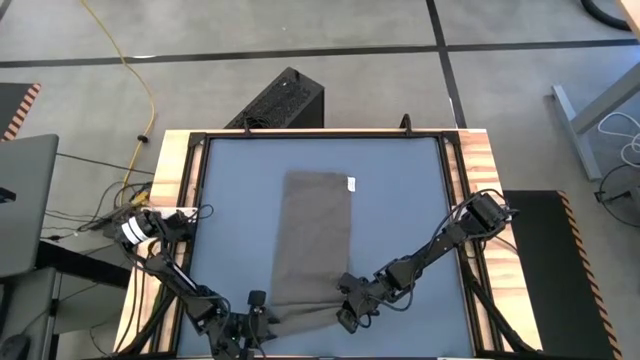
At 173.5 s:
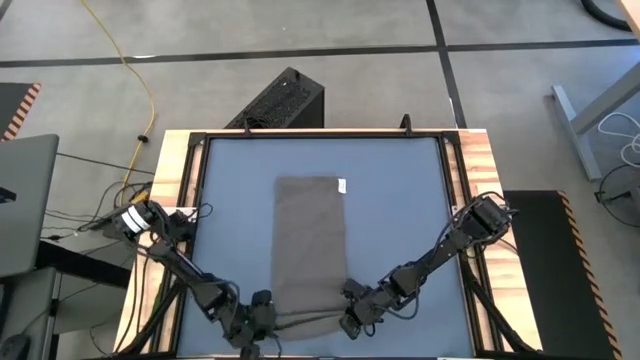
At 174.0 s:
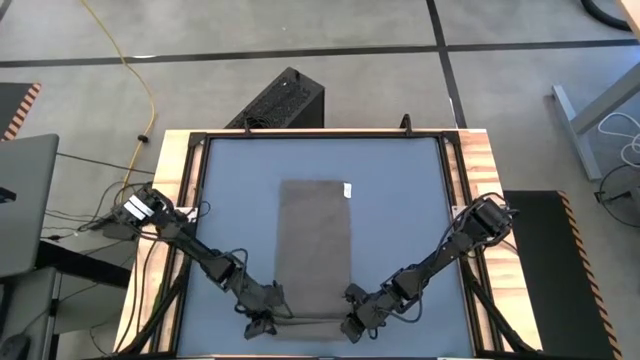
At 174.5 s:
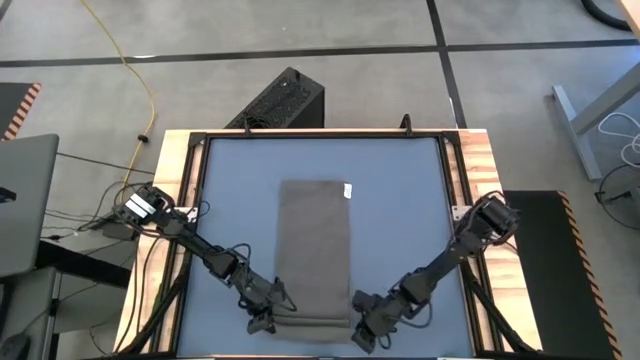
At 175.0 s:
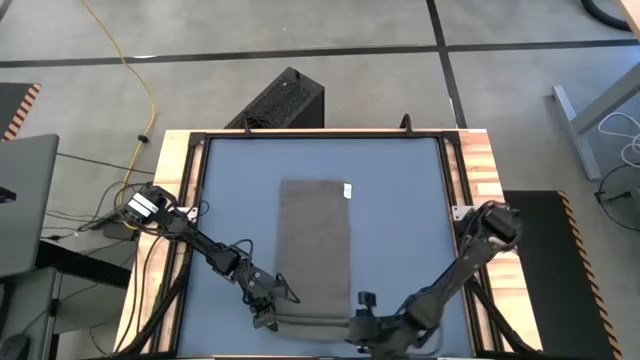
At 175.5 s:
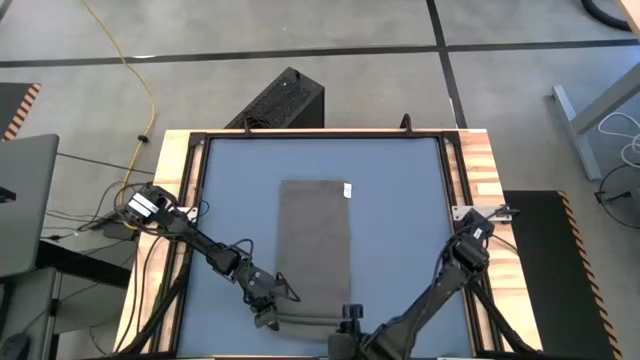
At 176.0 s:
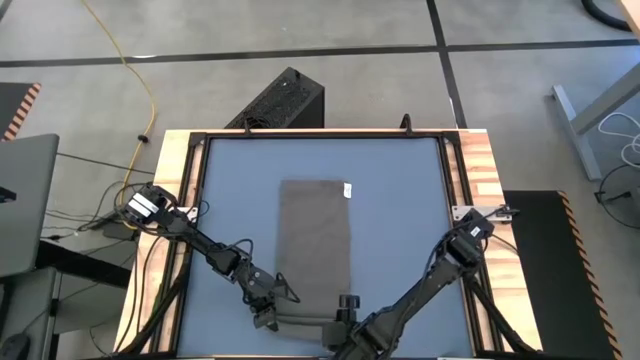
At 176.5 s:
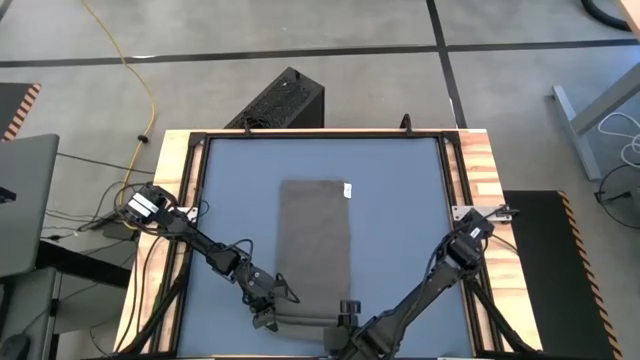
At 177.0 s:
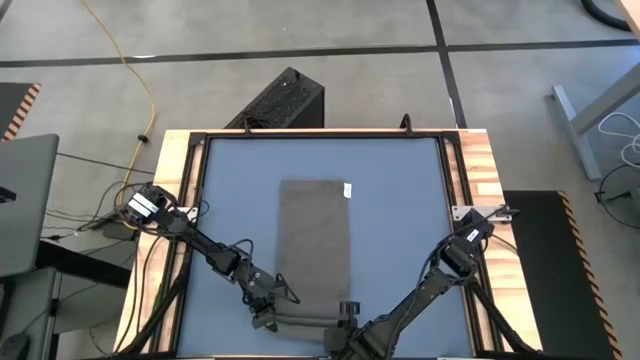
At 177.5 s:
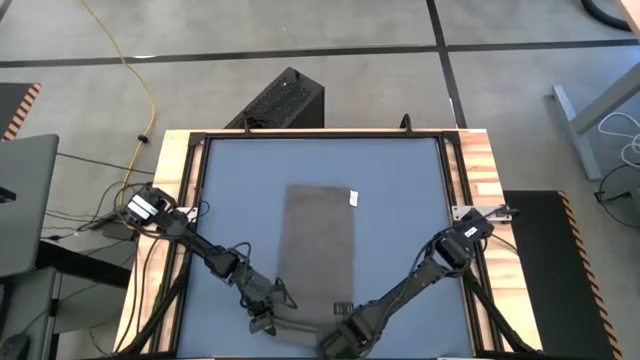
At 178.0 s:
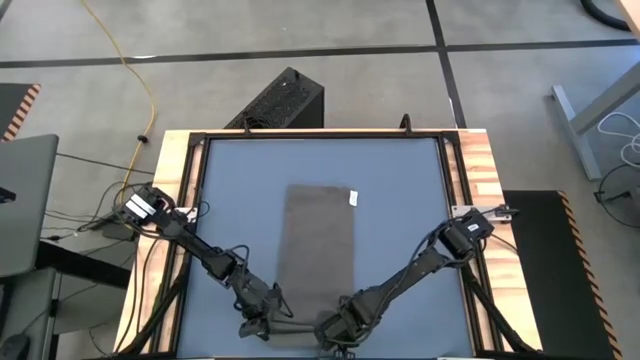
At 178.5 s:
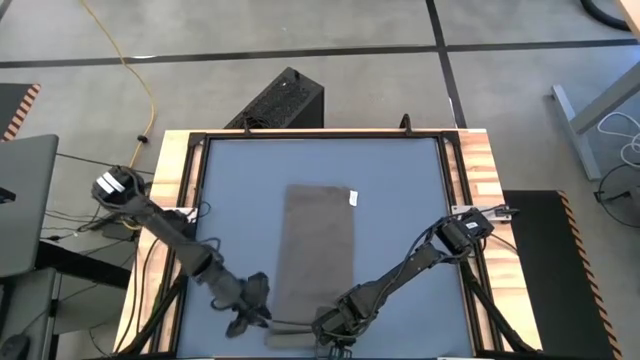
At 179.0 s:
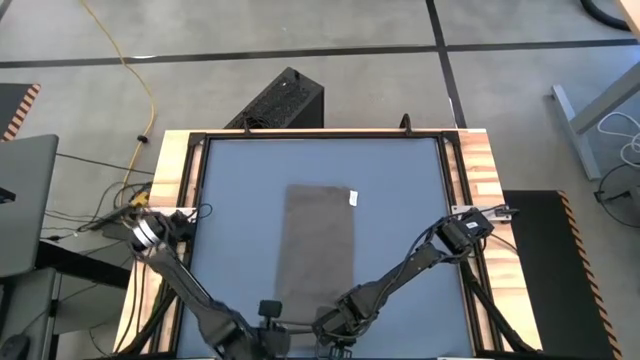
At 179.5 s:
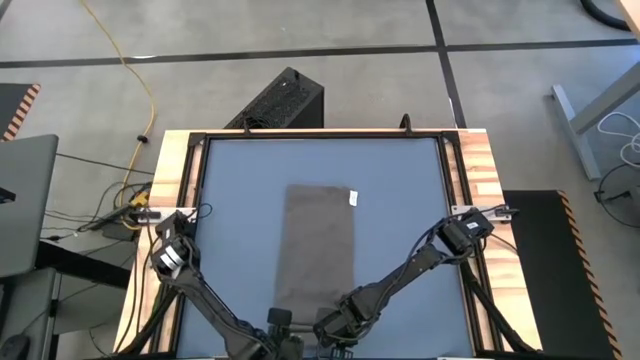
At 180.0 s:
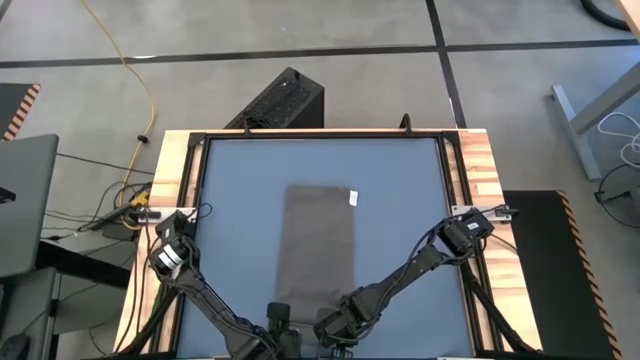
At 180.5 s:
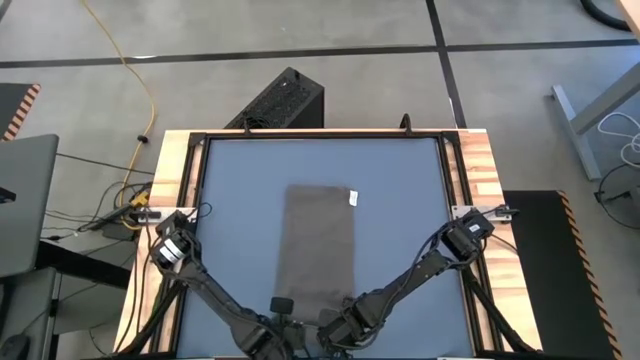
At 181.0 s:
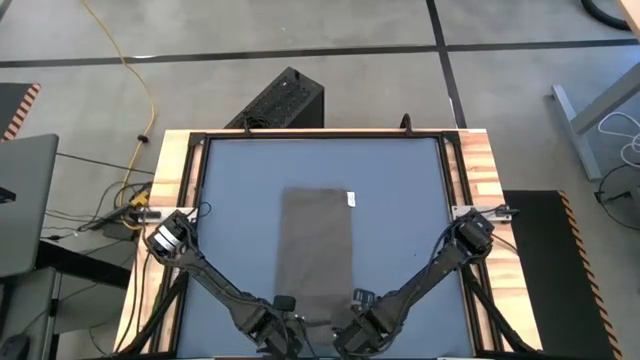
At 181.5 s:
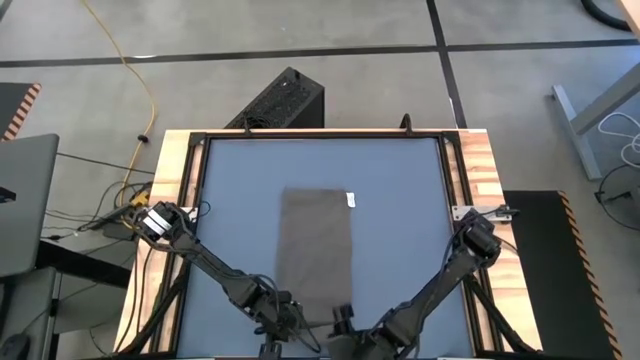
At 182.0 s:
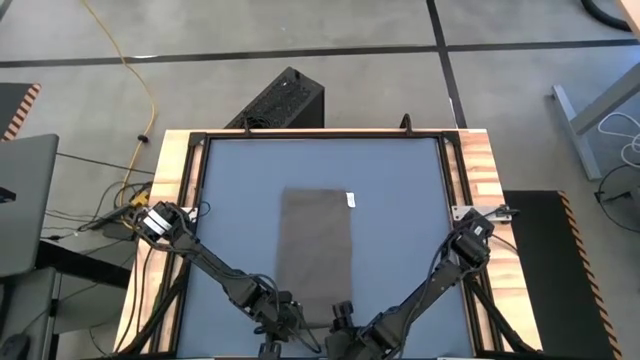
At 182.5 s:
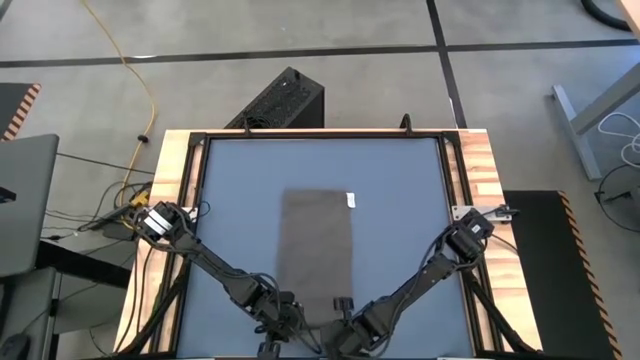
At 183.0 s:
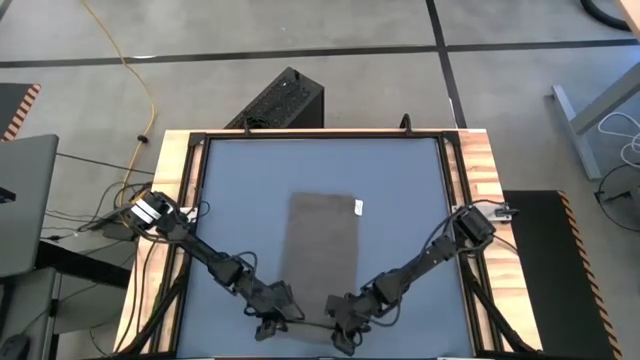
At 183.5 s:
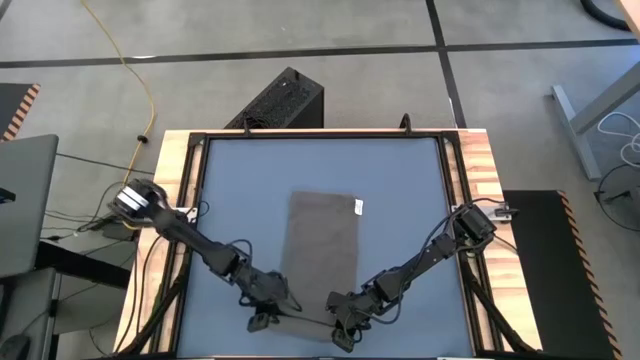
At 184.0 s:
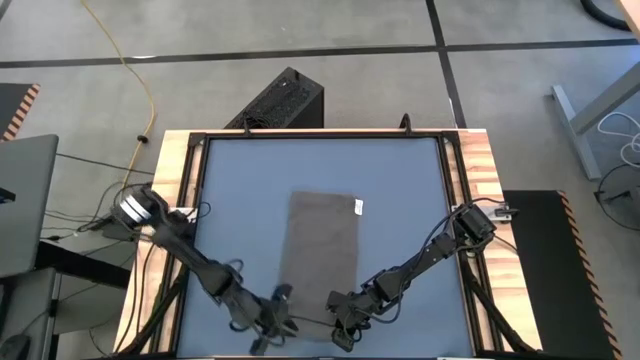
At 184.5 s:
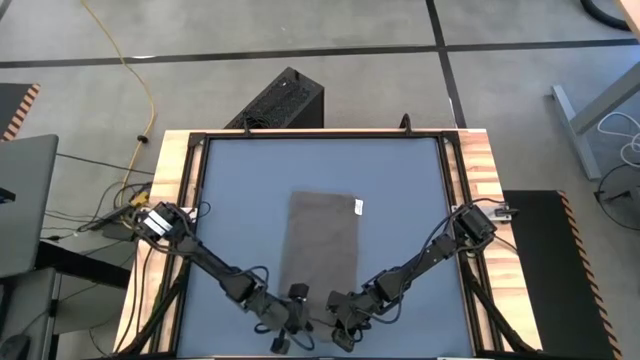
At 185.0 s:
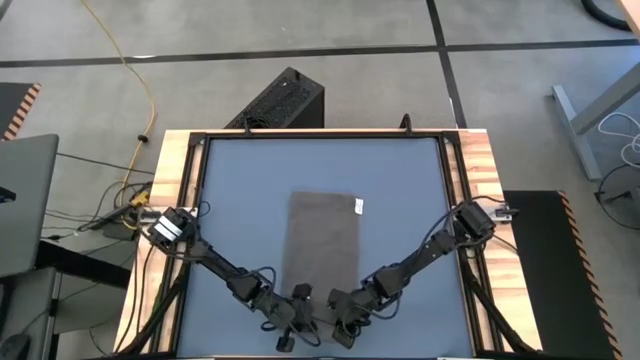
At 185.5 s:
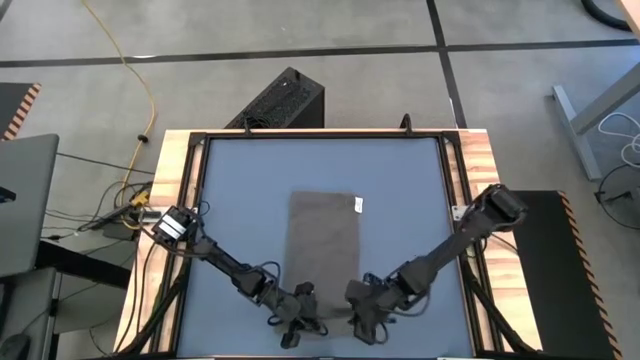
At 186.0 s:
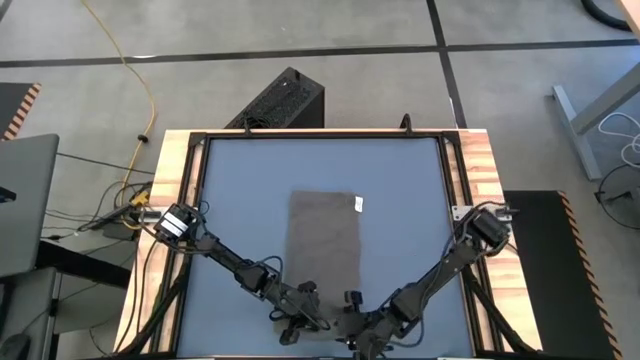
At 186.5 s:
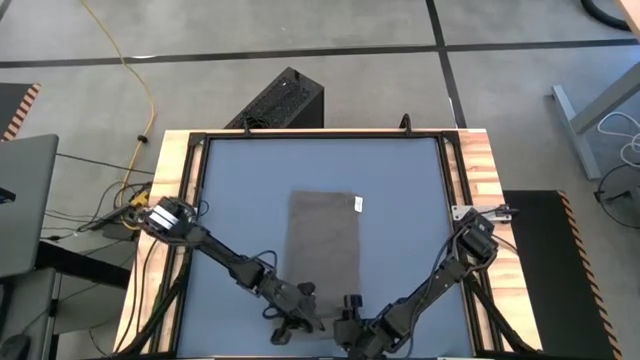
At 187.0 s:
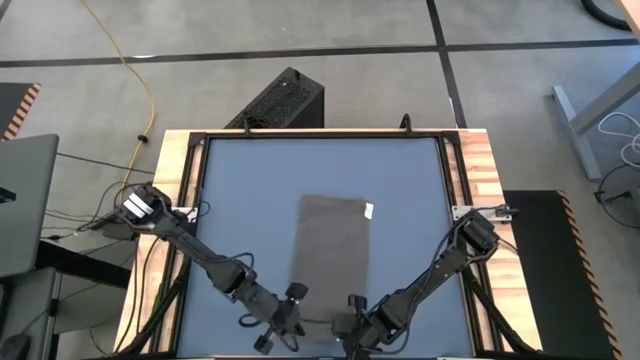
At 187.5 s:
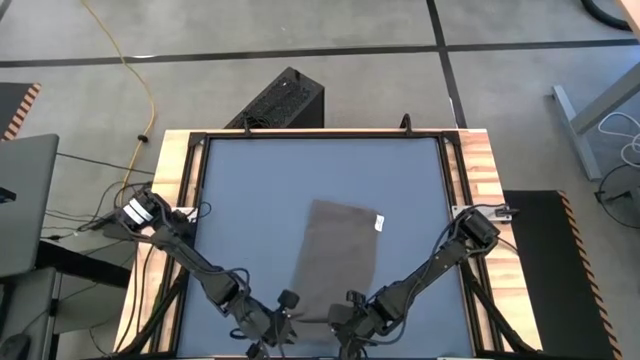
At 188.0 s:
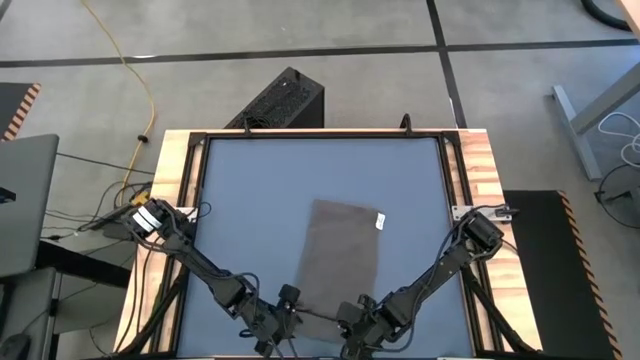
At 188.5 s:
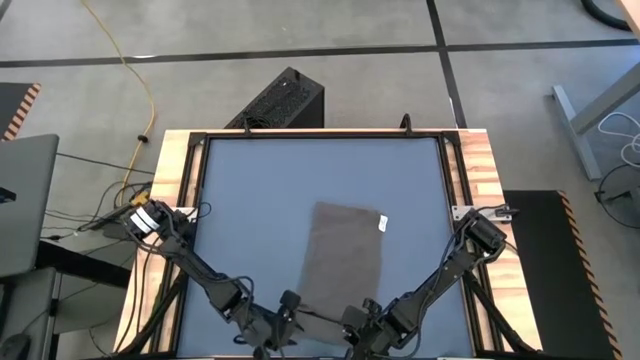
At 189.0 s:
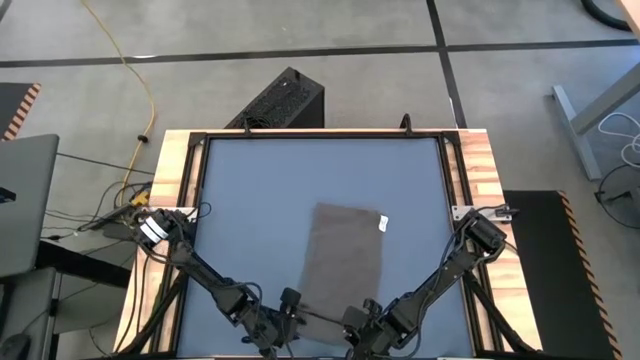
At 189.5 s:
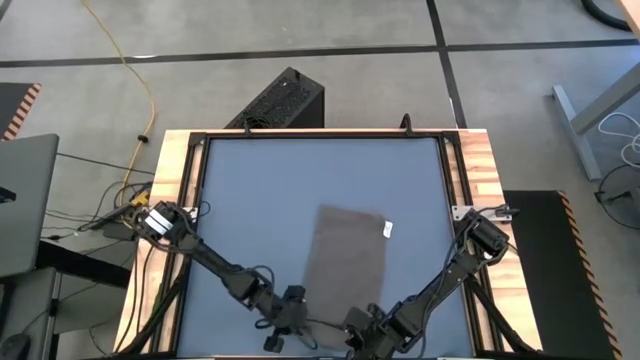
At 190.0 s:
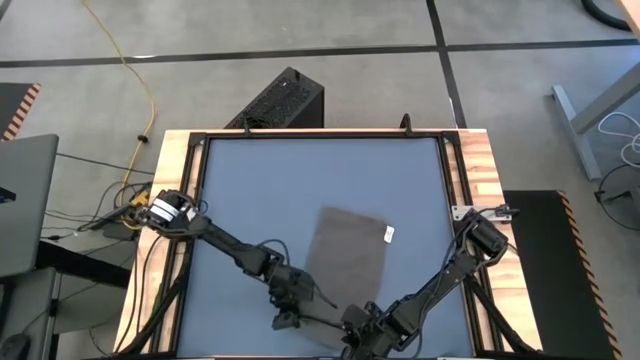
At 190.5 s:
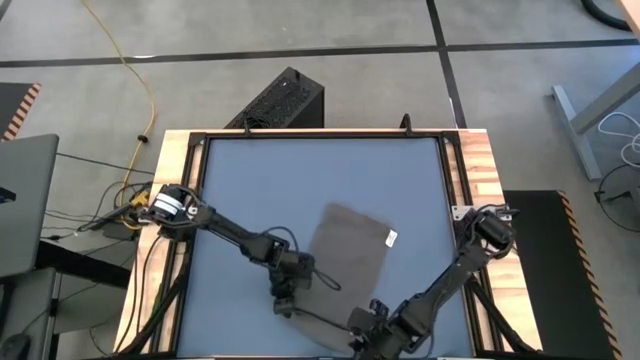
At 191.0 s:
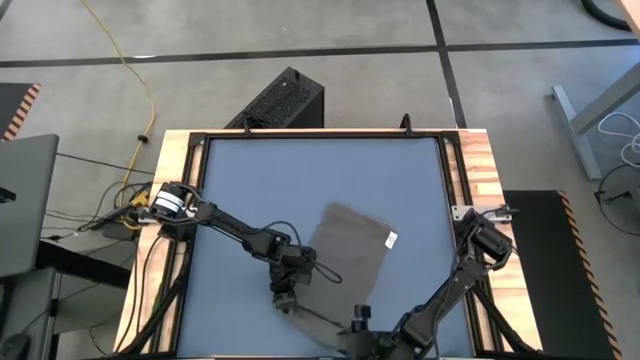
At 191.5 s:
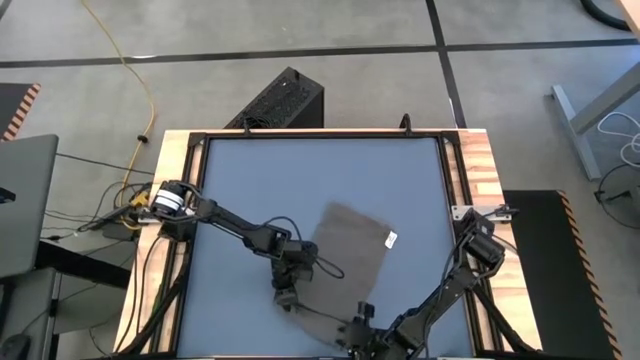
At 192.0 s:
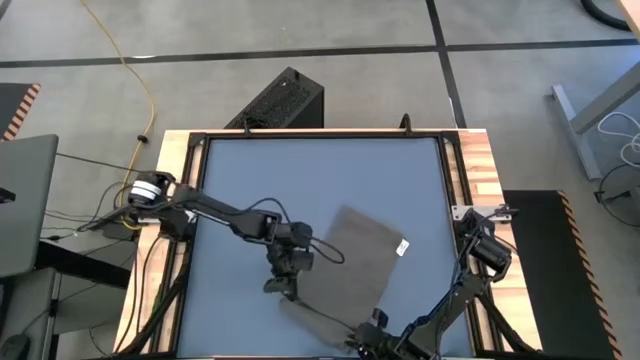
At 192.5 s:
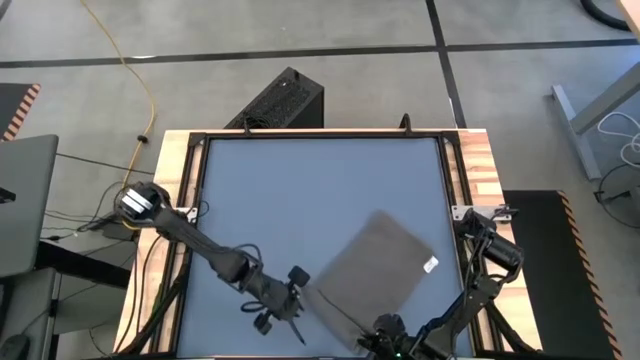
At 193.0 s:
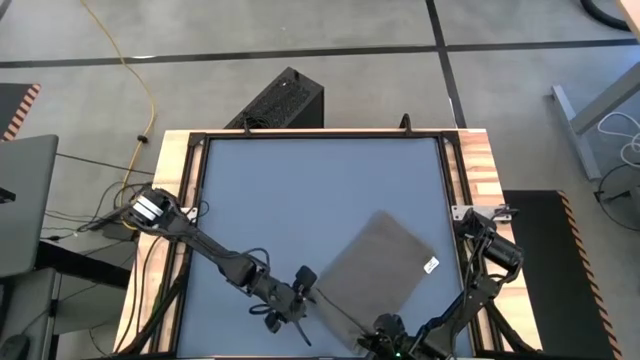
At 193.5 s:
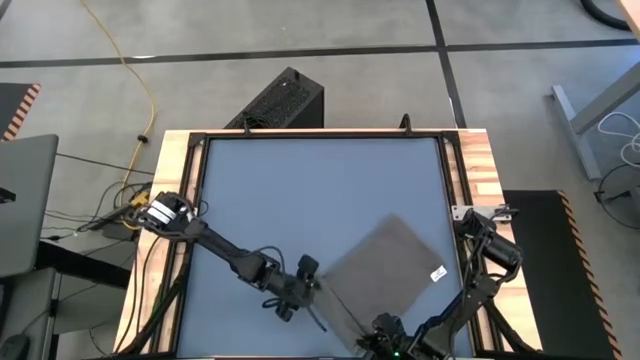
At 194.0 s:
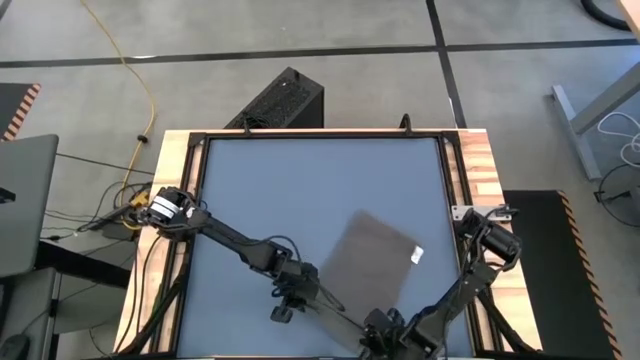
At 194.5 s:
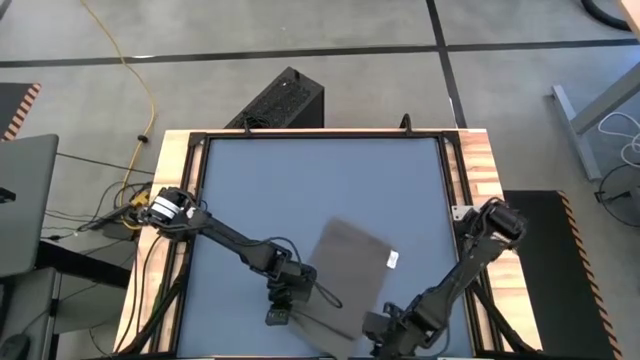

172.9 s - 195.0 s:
Task: Roll towel
Roll the gray towel
